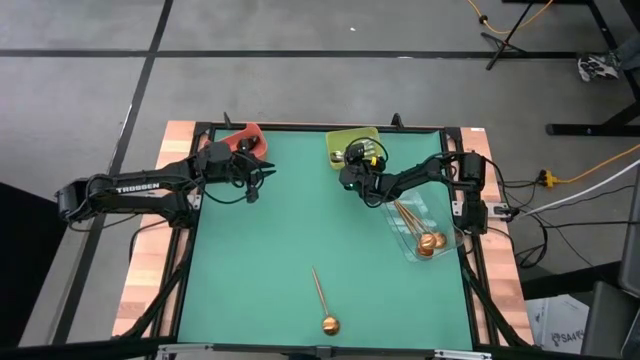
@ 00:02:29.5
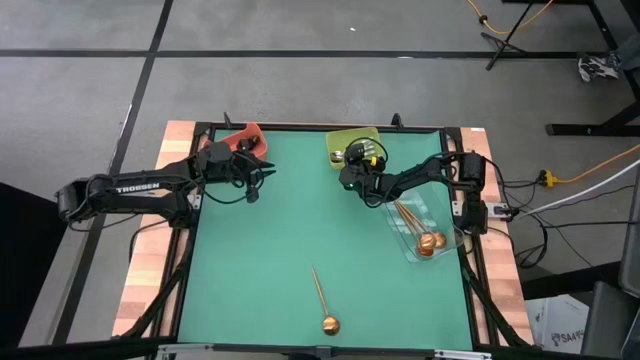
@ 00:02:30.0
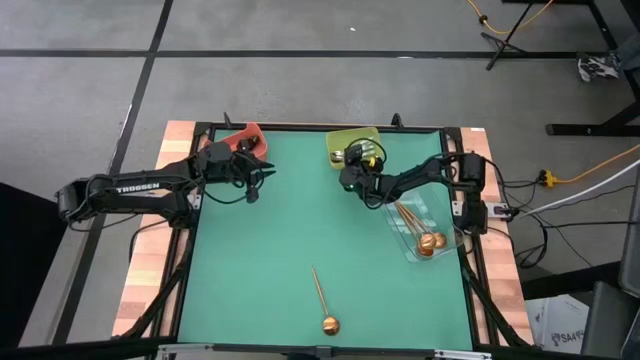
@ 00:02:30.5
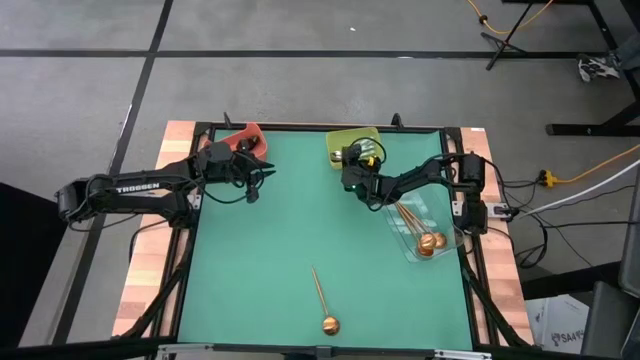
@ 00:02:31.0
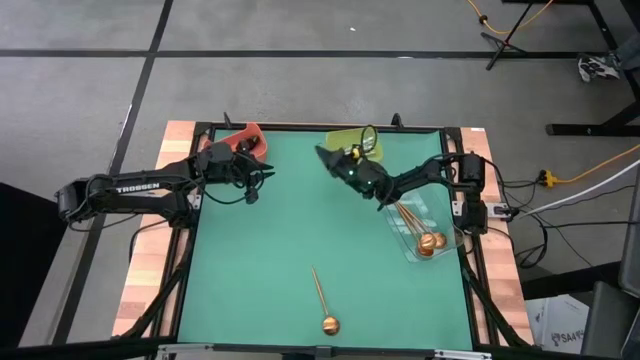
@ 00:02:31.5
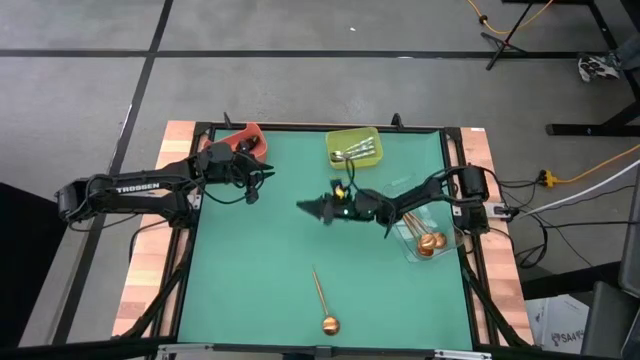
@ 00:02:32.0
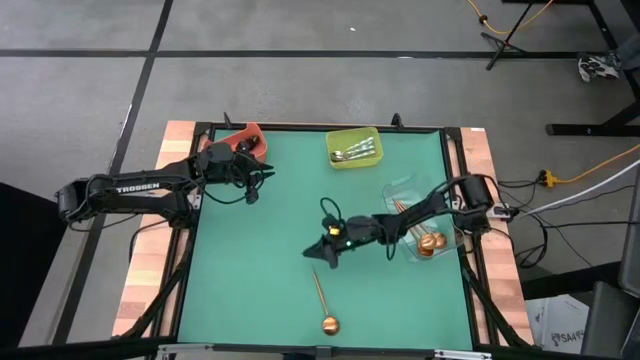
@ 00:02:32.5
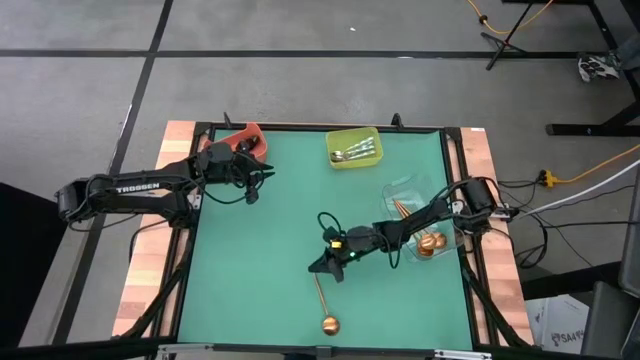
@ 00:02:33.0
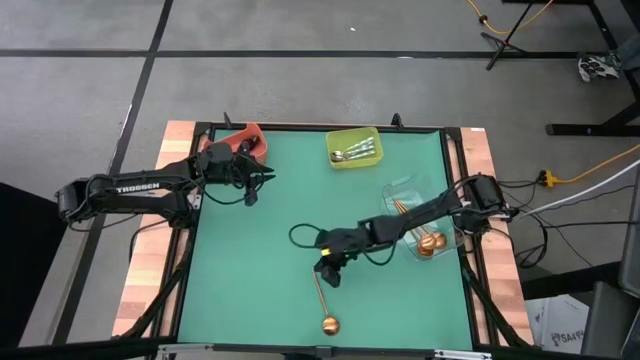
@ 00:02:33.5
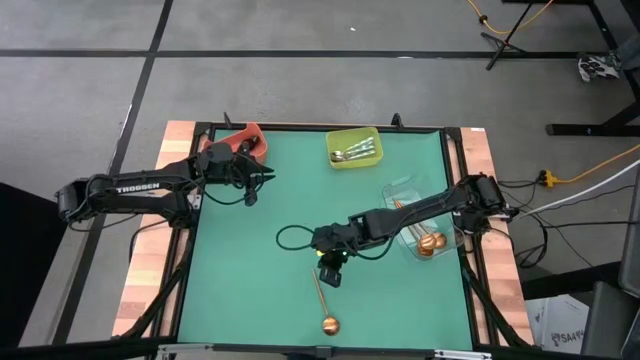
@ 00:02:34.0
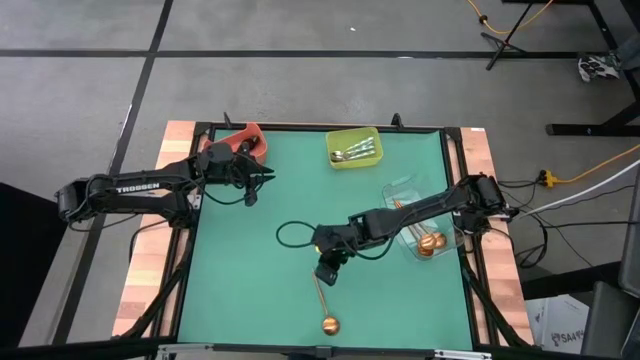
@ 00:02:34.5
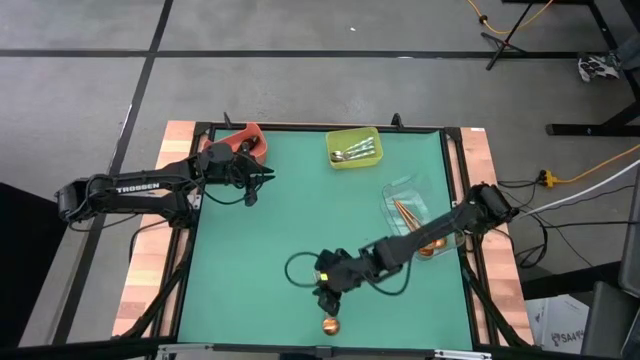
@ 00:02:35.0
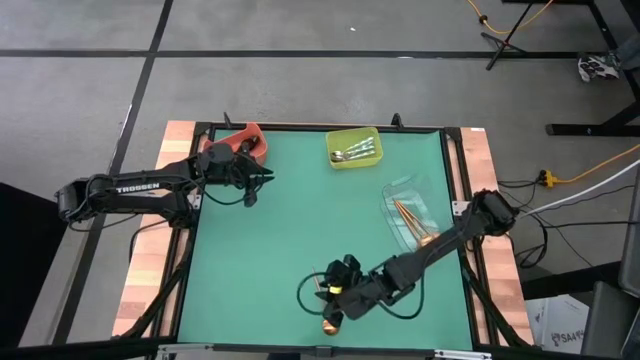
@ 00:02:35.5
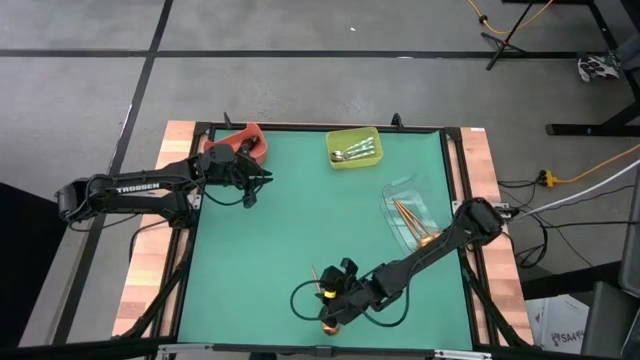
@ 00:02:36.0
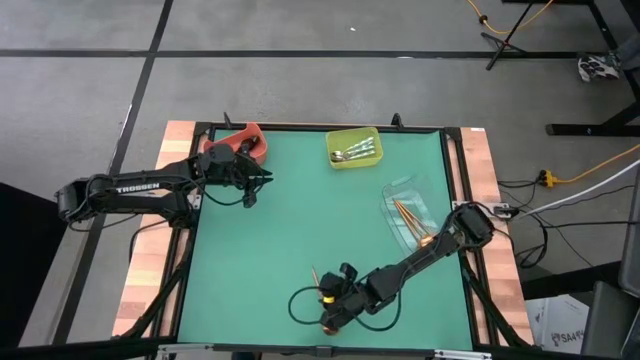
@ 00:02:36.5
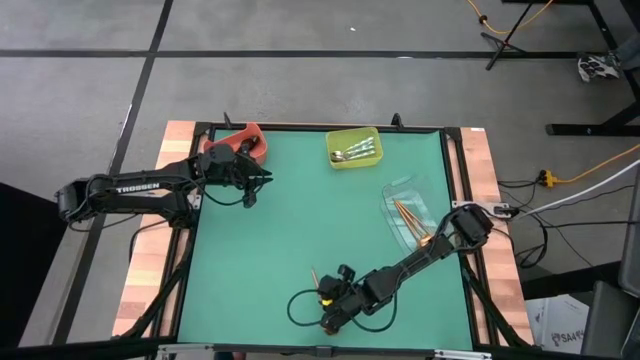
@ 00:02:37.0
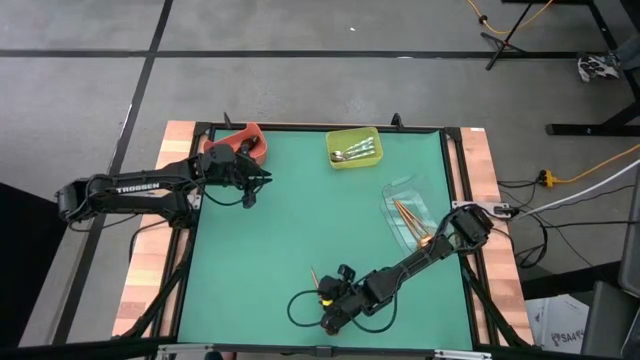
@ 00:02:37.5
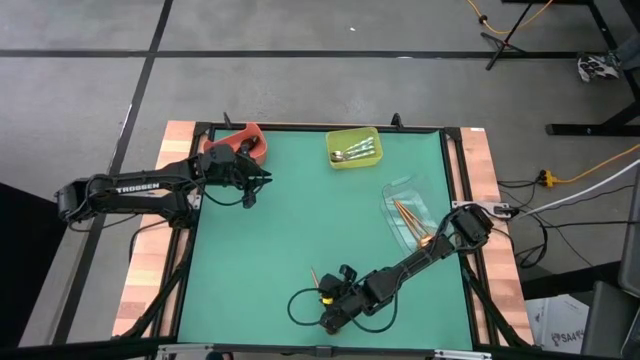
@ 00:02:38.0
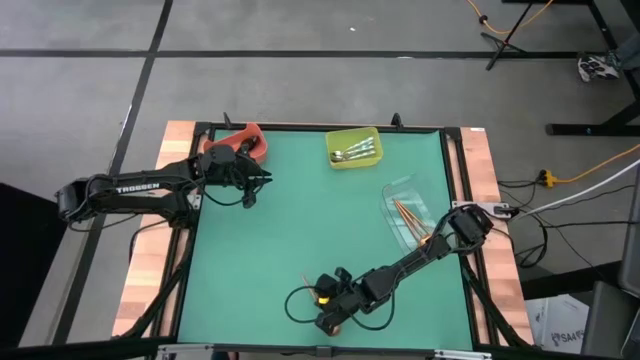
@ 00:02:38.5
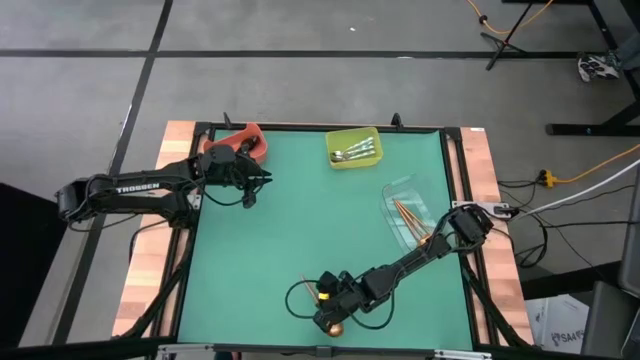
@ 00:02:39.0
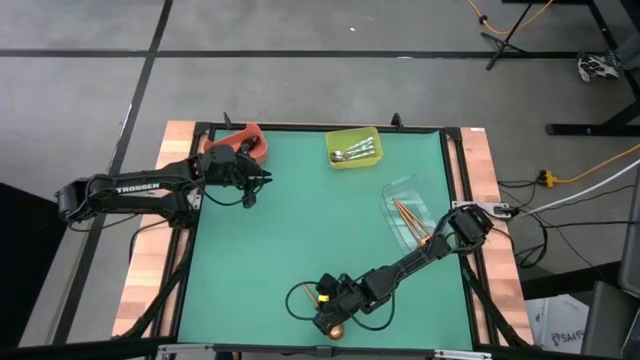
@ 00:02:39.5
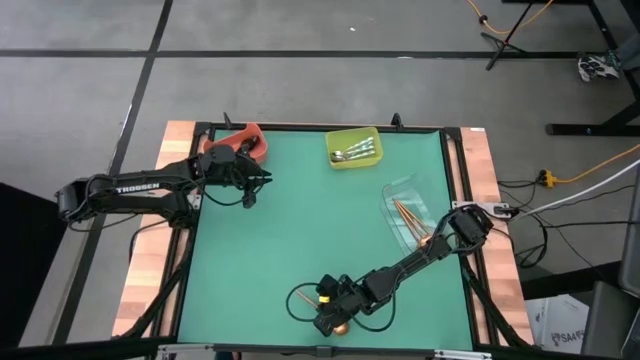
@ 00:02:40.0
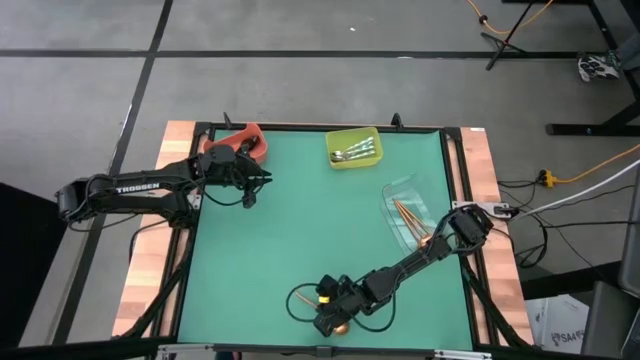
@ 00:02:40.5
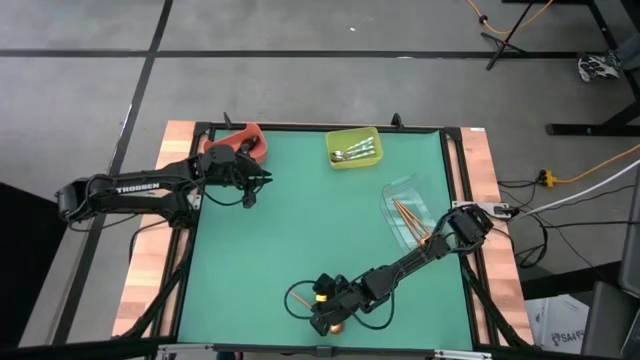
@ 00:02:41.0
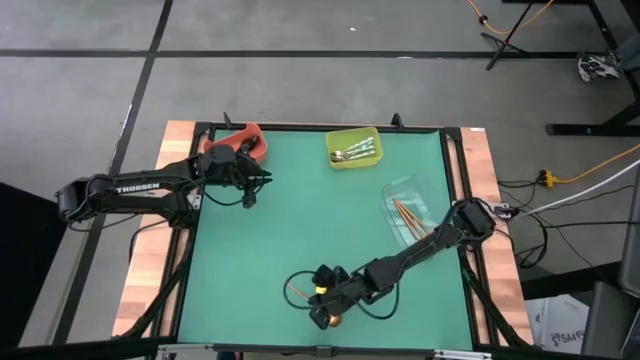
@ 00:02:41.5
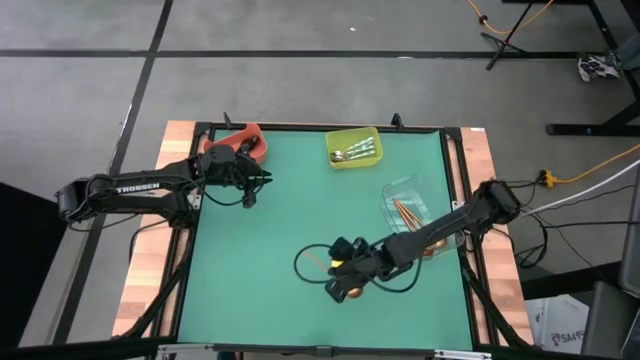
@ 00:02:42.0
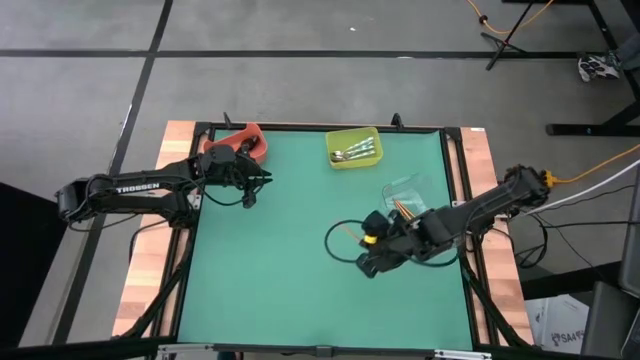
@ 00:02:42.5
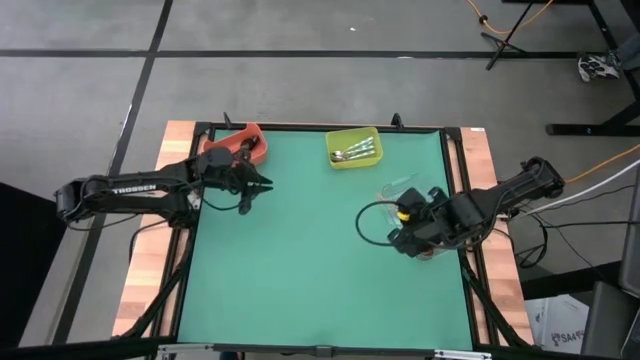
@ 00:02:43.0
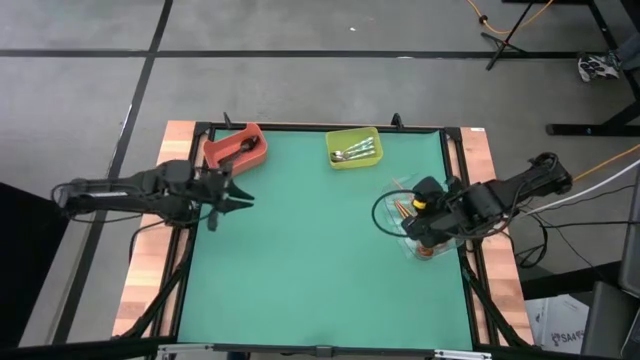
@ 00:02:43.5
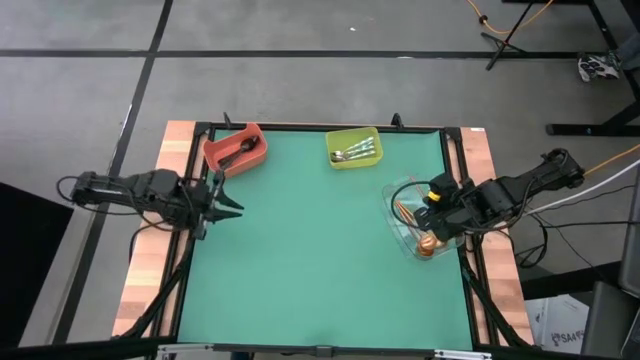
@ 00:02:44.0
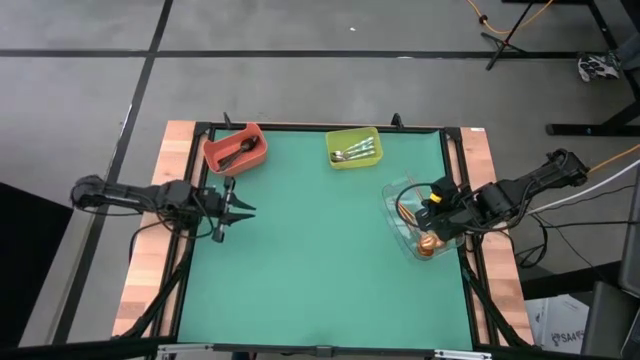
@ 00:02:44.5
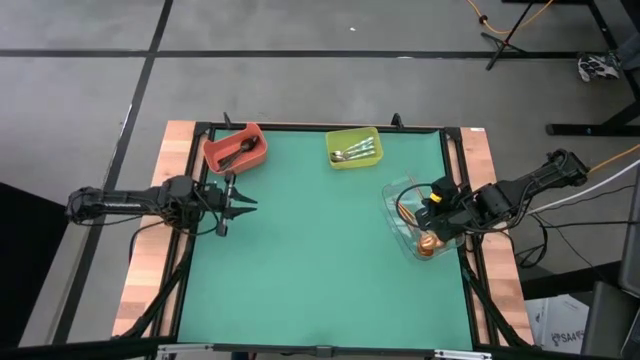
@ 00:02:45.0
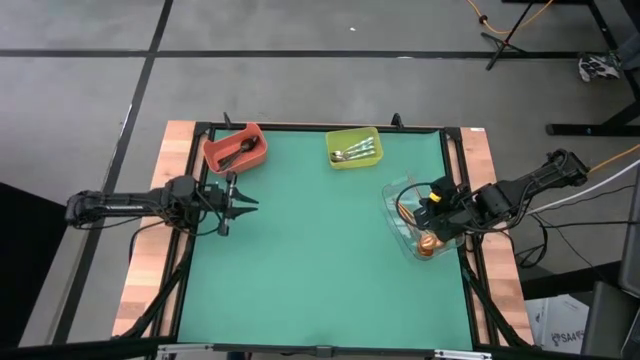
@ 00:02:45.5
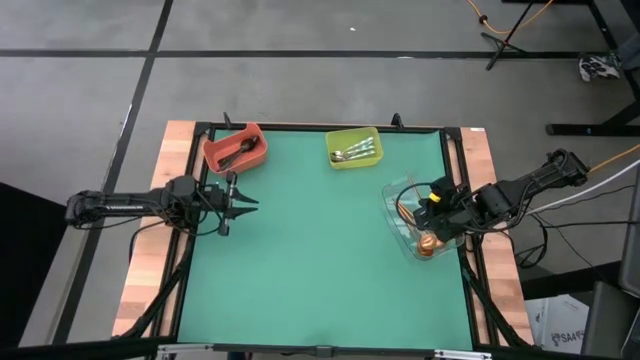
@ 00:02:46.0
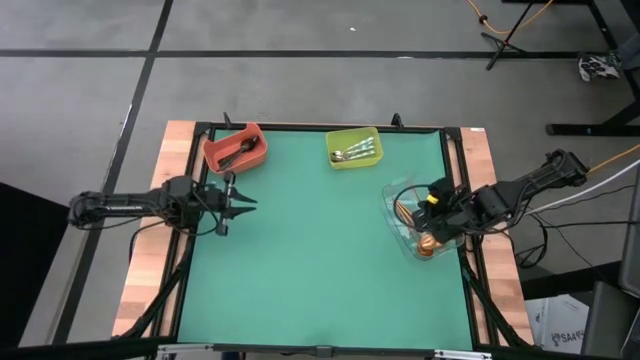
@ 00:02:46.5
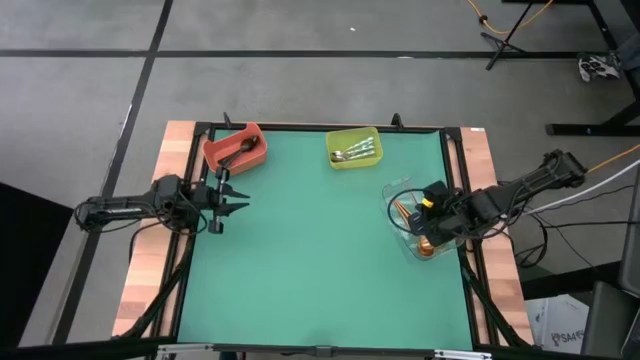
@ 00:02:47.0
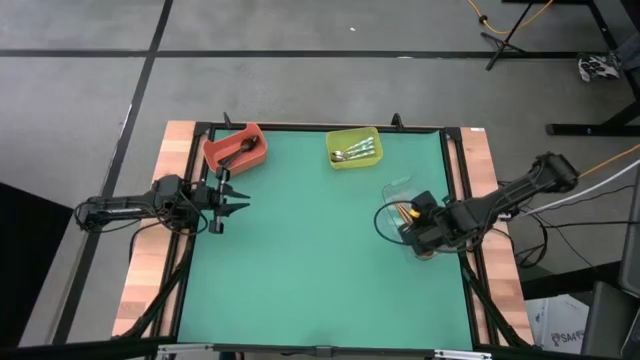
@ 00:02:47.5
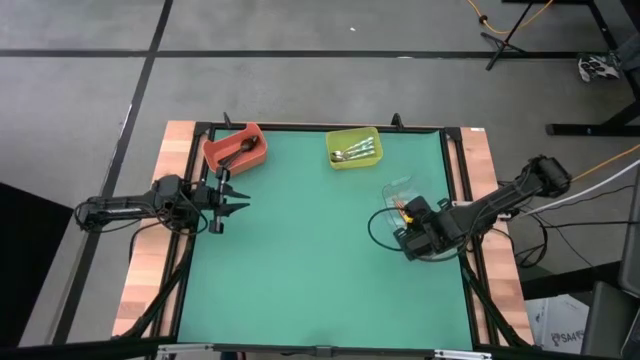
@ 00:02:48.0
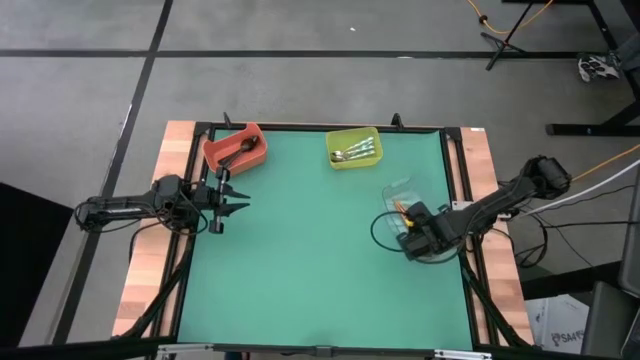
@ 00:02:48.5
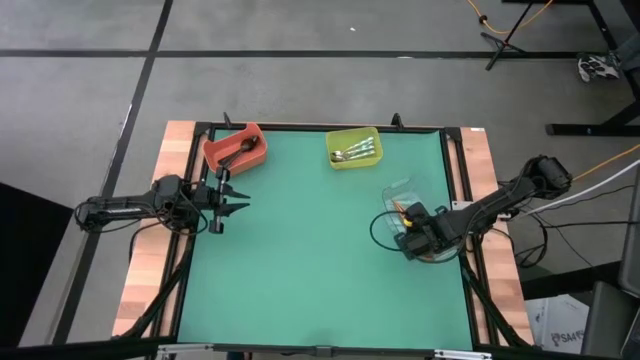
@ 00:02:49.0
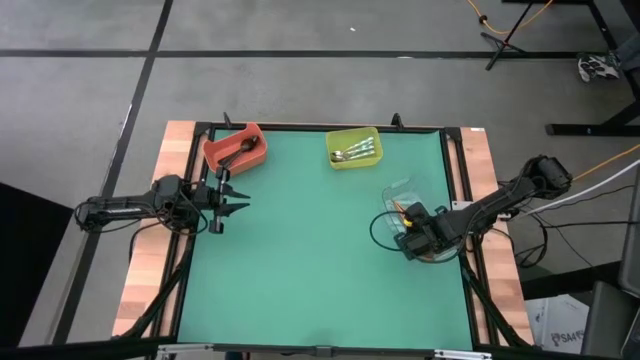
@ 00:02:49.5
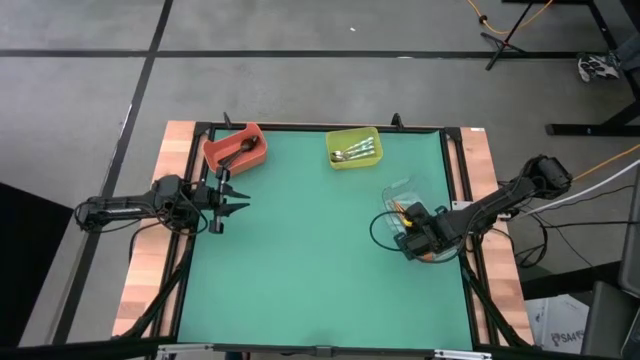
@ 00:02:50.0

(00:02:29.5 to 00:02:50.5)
Task: Sort silverware by color (type)
Put the gold spoon into the transparent bin
